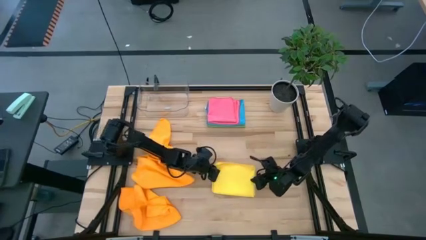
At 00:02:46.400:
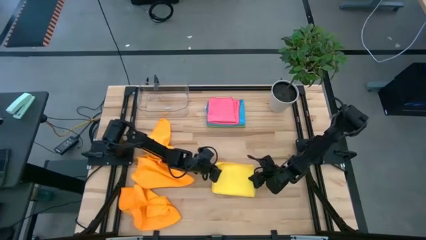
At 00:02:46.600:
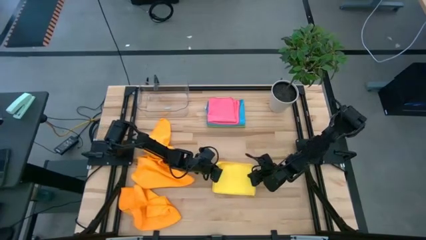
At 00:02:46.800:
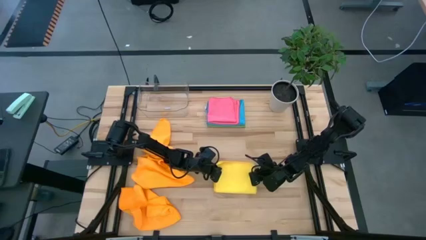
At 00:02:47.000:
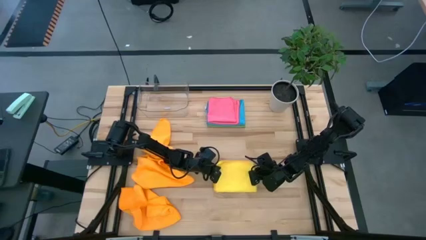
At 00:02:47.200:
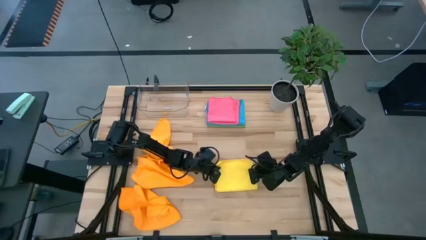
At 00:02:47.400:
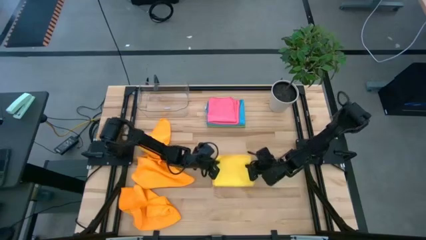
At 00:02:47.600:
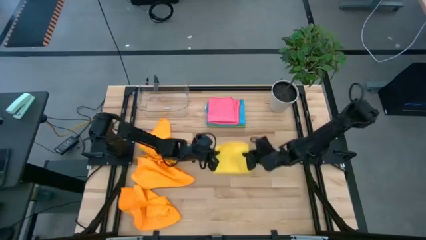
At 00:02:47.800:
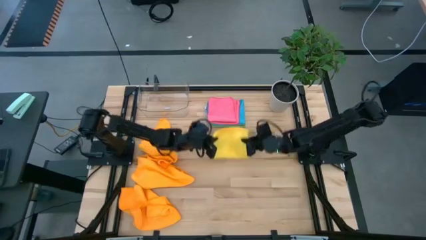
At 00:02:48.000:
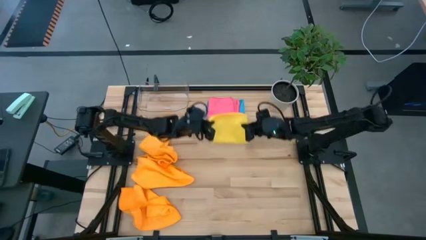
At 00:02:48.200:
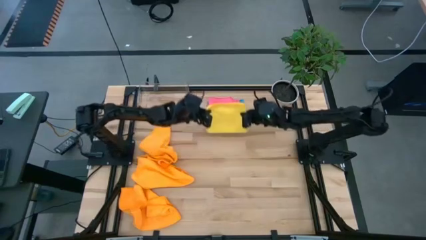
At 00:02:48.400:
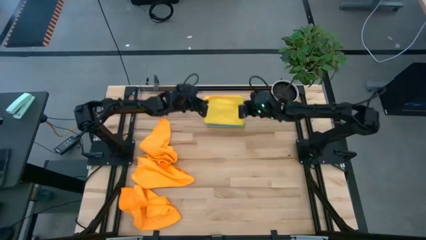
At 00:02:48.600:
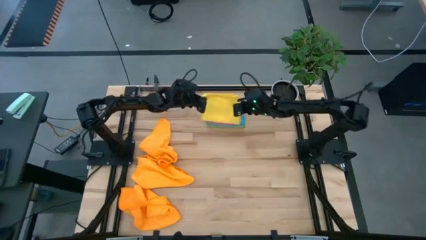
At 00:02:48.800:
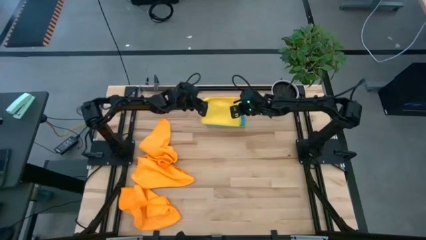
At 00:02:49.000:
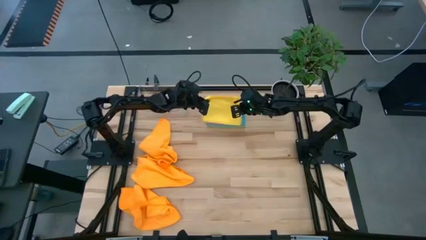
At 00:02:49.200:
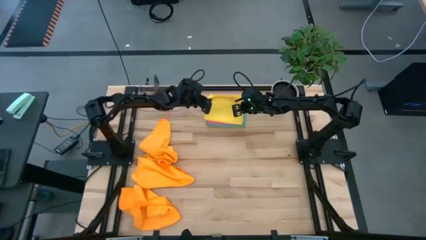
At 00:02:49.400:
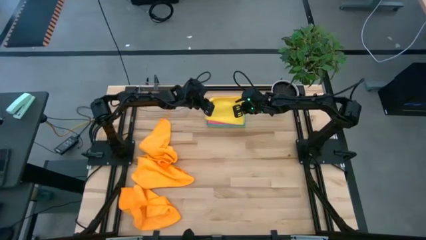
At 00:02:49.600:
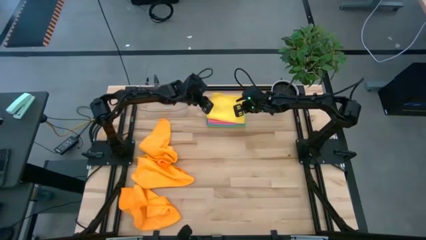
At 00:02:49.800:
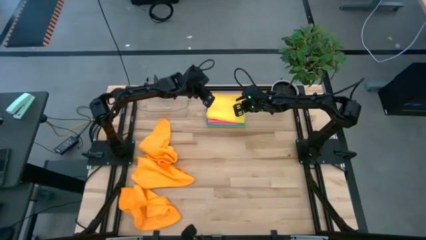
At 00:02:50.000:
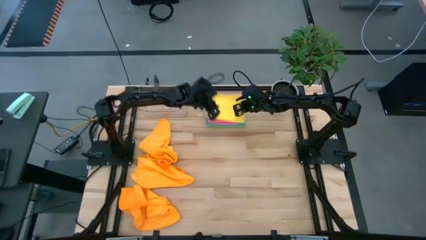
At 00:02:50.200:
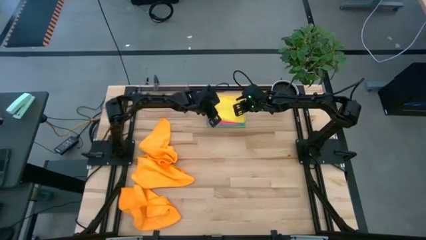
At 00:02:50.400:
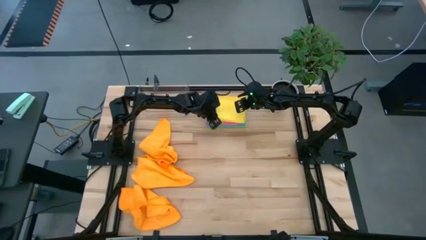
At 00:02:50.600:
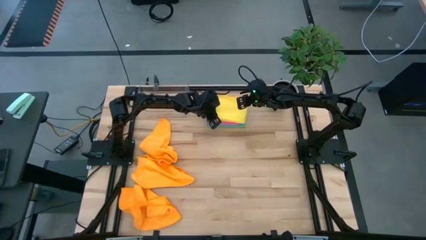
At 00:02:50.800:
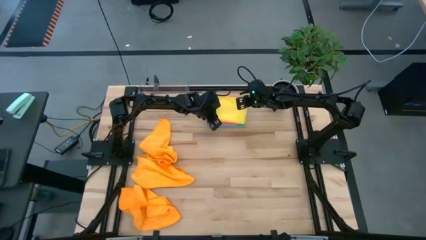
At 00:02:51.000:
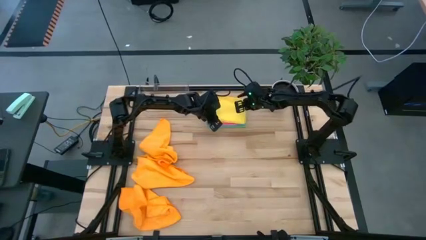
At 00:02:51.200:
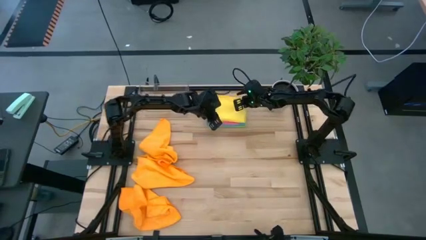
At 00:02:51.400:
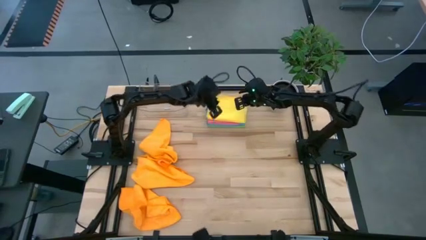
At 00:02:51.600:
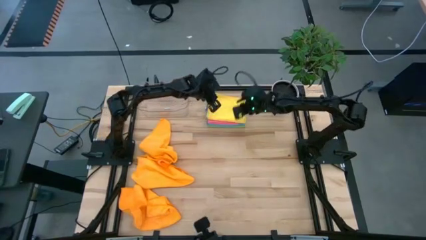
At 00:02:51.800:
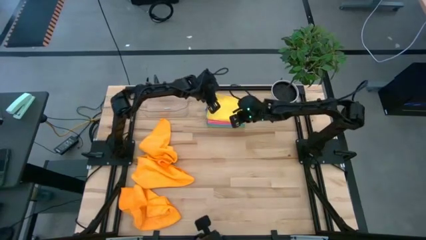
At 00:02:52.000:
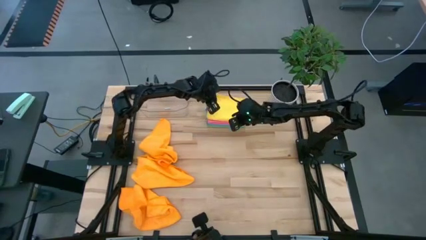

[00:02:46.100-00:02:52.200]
Task: Fold microfiber towels
Stack the folded yellow towel on the pink towel

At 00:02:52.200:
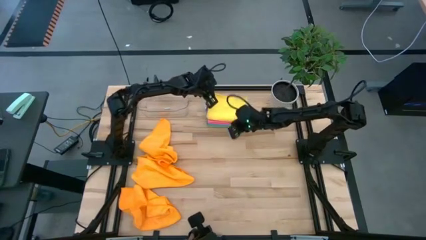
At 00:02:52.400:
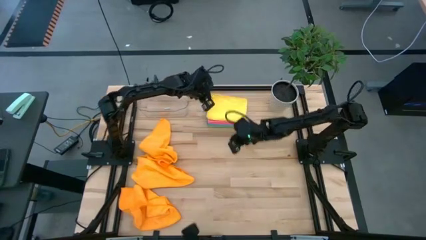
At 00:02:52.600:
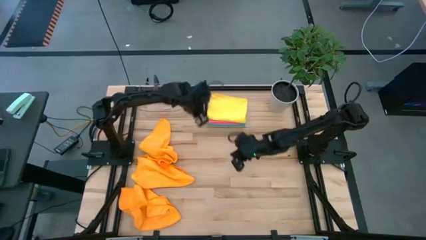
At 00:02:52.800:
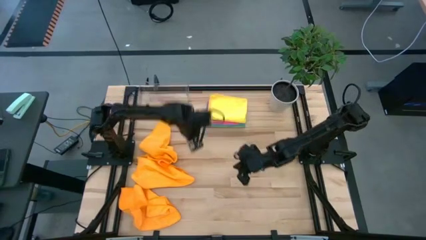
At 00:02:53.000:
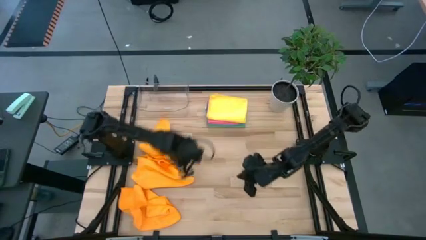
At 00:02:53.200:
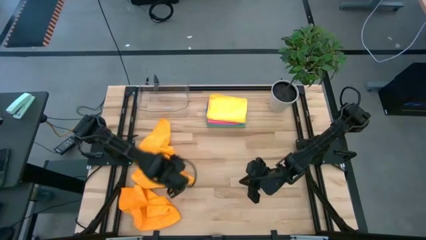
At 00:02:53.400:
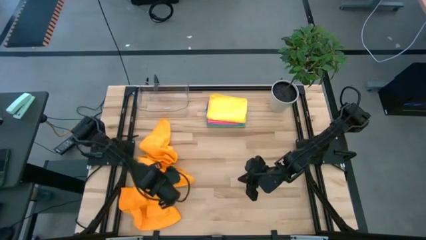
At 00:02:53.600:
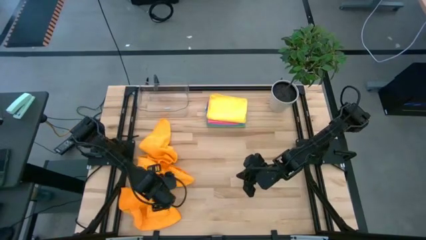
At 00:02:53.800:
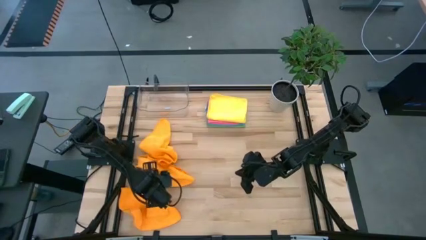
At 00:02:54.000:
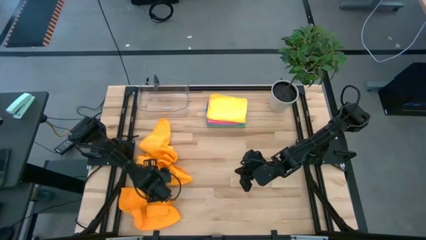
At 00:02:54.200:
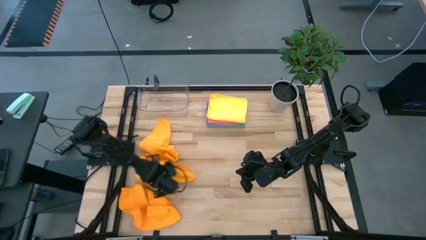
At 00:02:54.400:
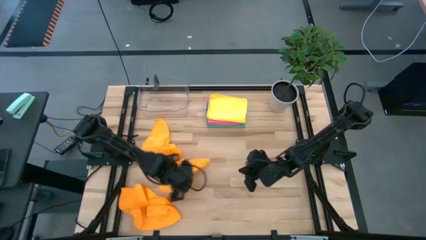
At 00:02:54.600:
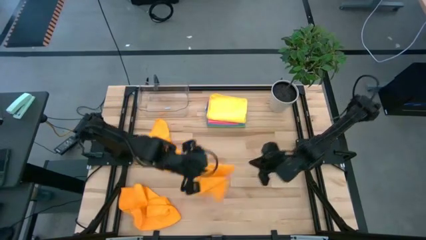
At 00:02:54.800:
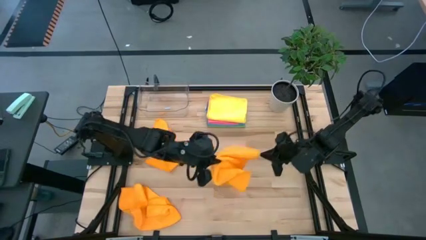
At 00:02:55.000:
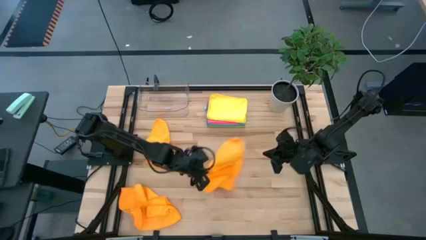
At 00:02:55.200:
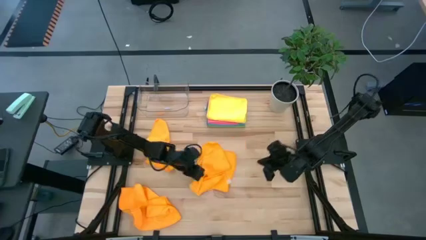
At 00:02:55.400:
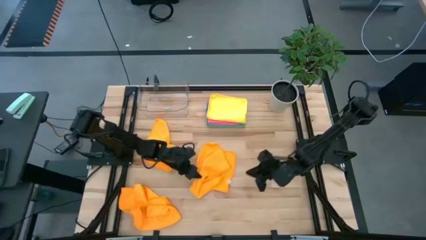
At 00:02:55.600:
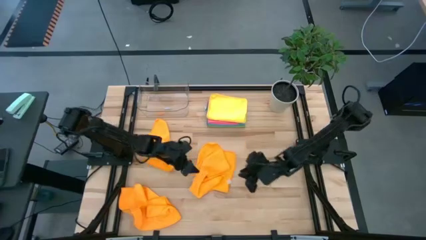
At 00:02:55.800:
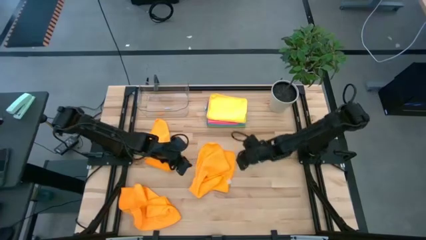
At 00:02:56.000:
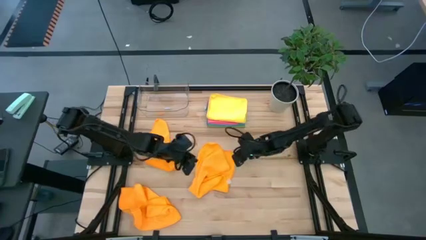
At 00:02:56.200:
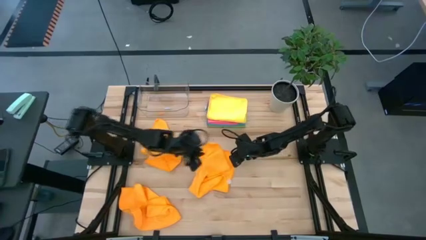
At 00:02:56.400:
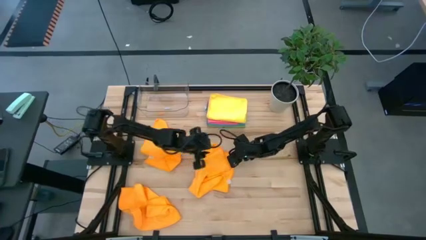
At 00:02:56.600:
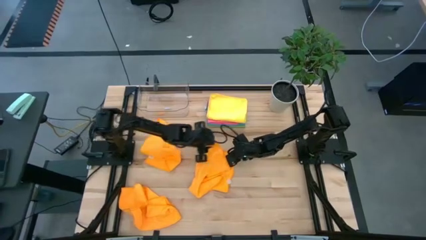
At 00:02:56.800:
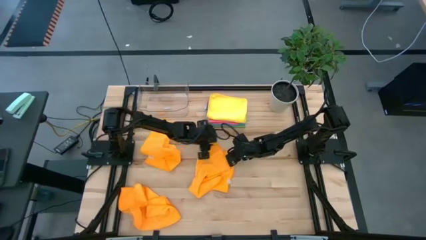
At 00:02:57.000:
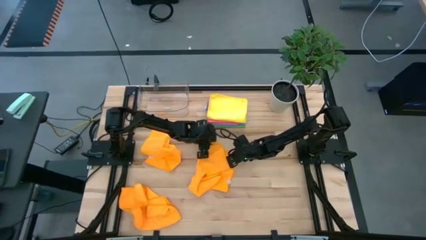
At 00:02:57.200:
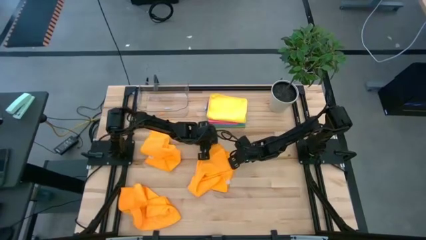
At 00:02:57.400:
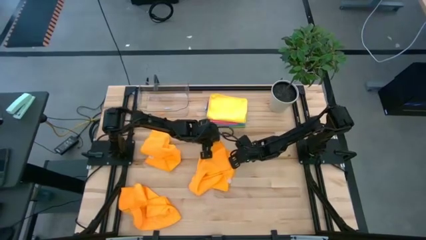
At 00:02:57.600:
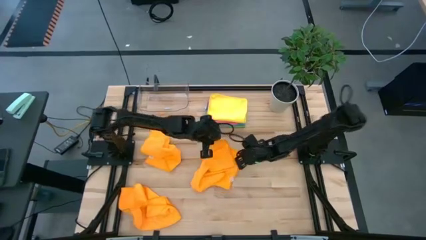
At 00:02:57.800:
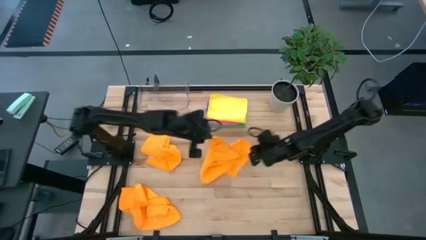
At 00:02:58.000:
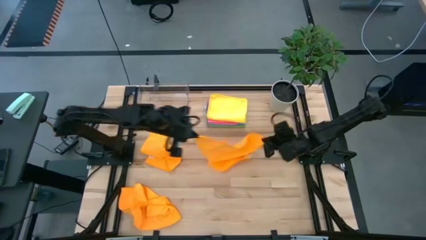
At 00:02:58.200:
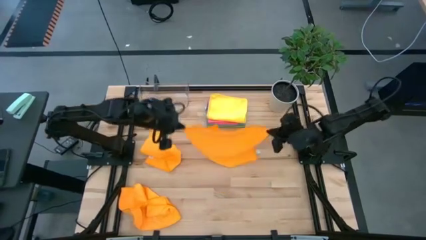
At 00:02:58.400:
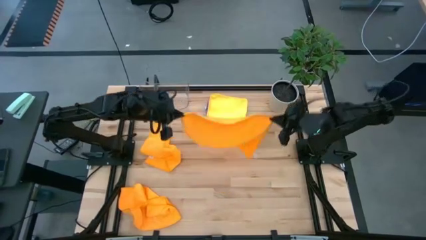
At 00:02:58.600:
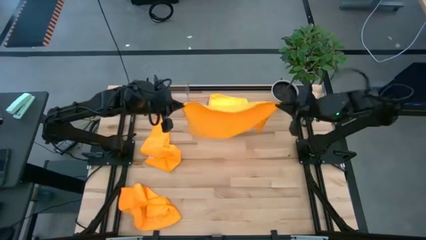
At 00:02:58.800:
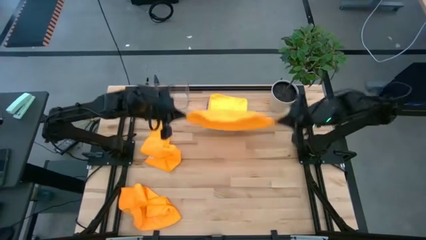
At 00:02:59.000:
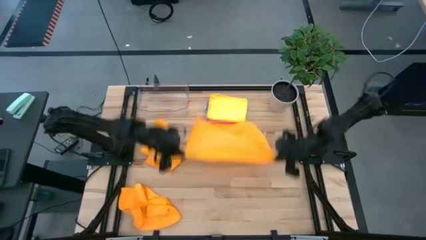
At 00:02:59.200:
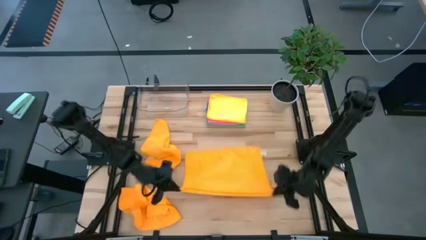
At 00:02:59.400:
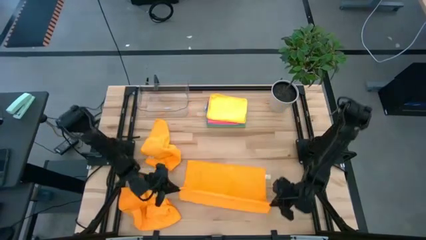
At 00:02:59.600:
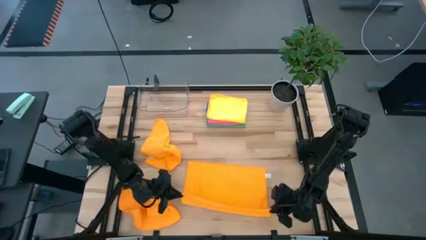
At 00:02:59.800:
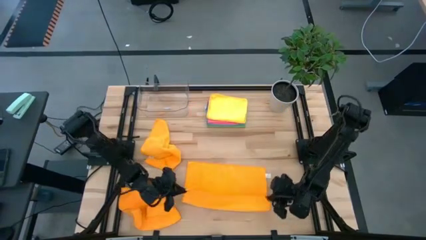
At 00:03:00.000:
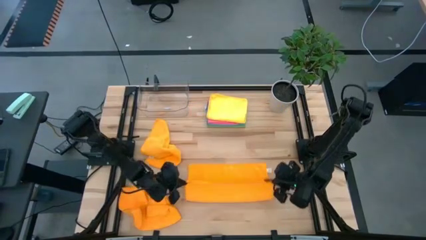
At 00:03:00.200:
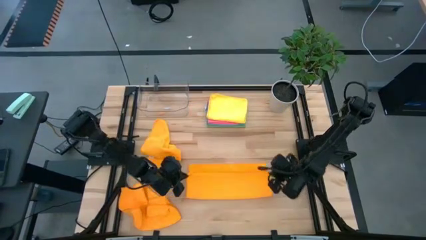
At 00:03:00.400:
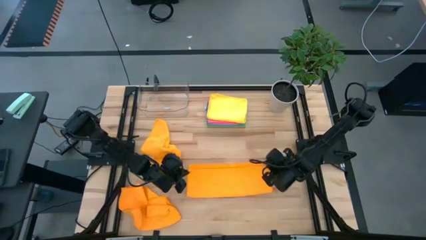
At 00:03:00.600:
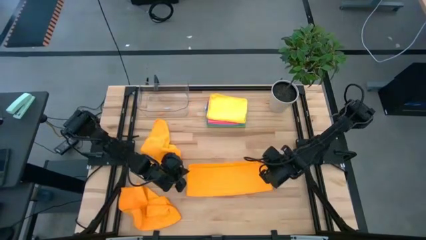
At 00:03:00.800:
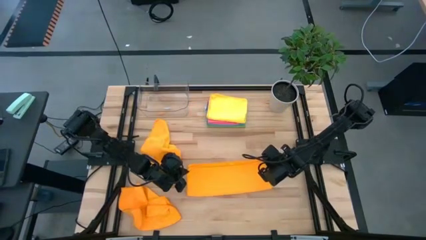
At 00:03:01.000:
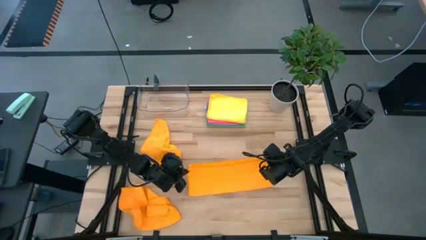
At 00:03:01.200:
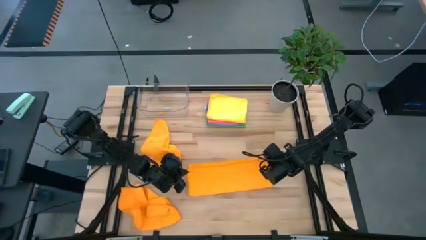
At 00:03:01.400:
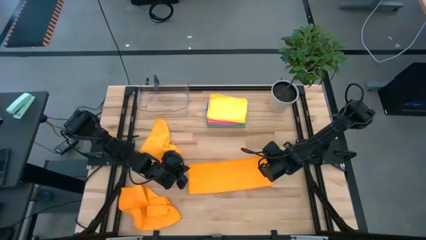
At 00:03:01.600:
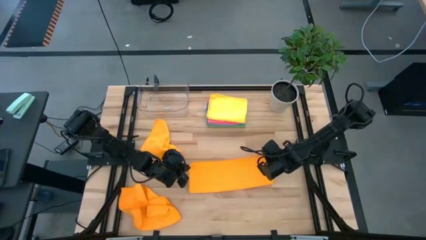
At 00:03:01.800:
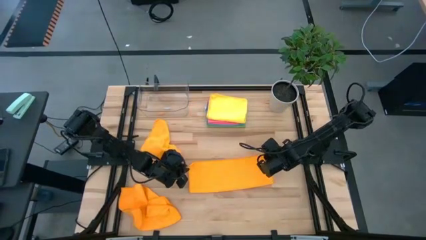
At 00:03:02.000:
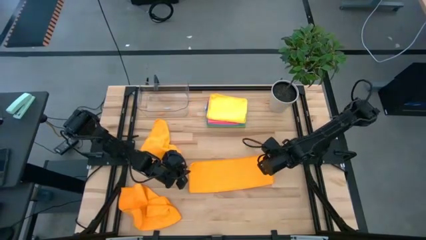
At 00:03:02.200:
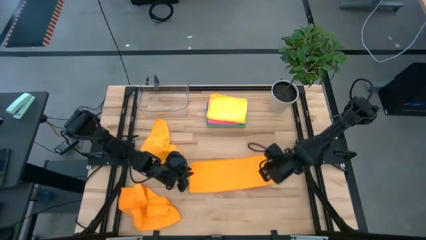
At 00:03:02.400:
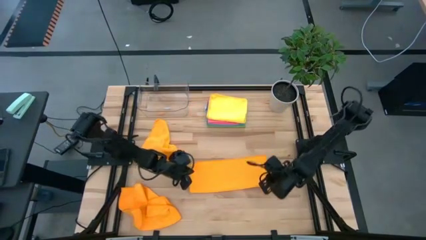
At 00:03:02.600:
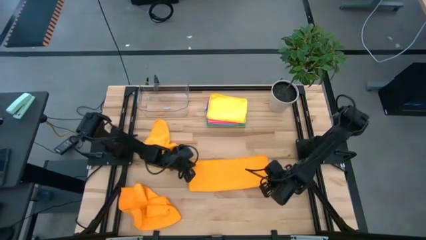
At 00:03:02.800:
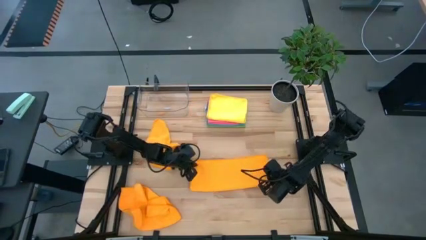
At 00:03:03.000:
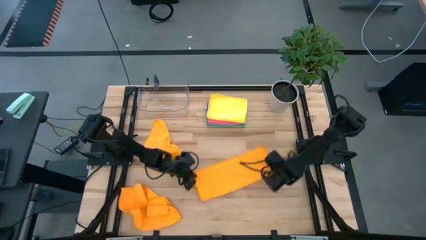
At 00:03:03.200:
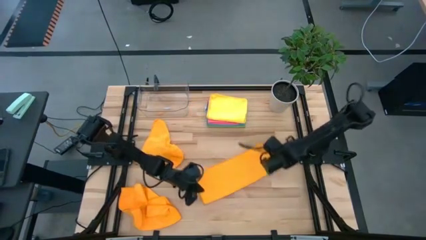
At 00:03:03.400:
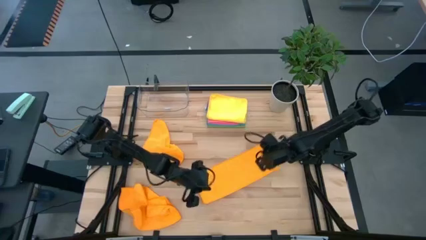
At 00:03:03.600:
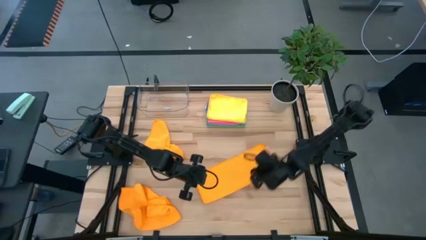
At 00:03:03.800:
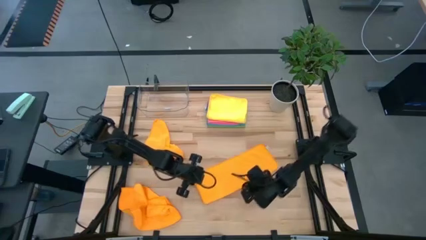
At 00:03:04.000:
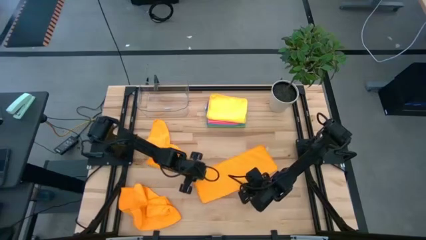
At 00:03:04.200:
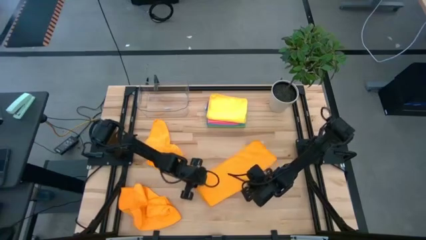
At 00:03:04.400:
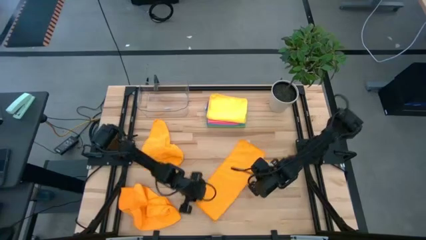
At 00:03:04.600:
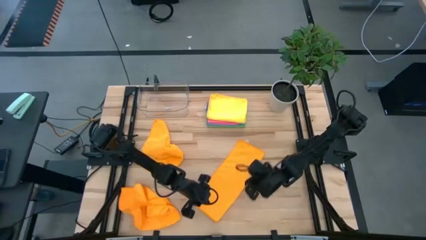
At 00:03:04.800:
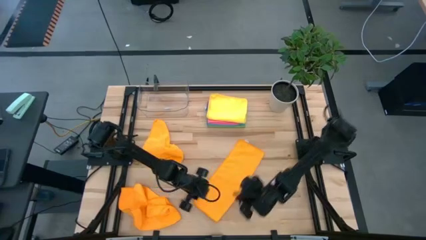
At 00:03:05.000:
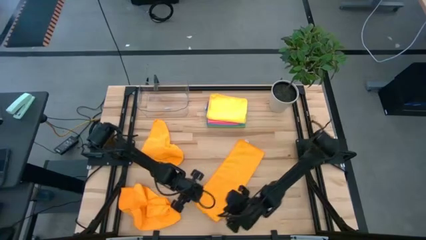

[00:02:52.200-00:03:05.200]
Fold the middle orange towel
